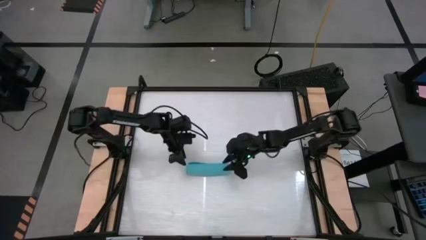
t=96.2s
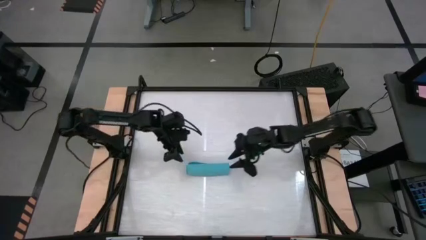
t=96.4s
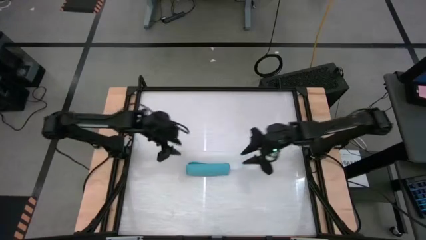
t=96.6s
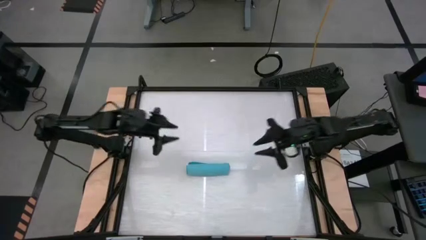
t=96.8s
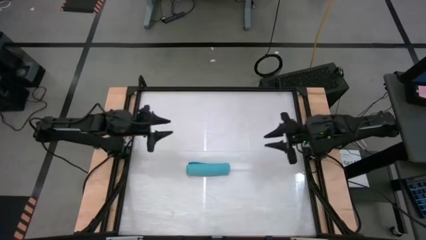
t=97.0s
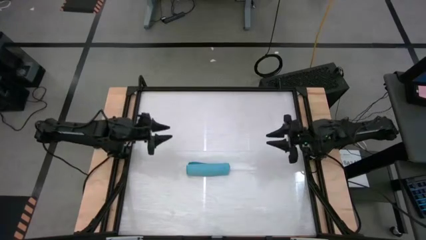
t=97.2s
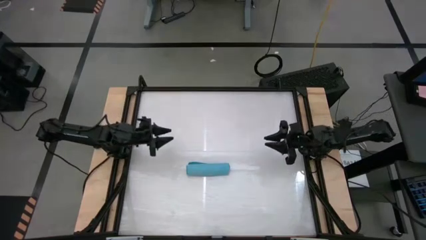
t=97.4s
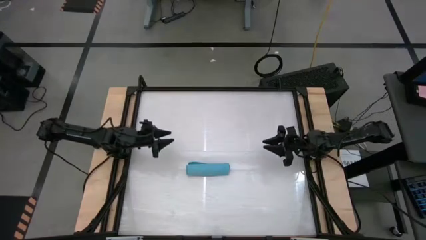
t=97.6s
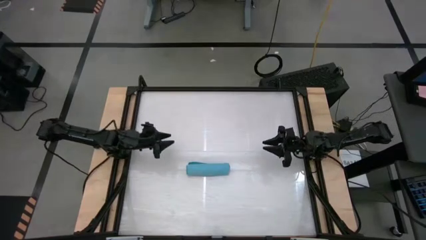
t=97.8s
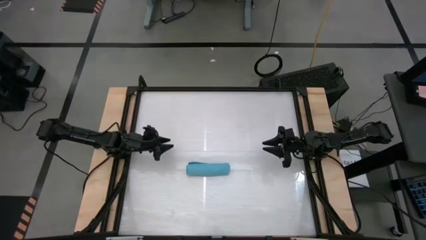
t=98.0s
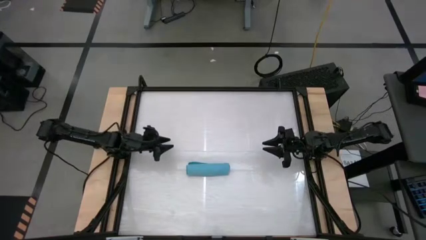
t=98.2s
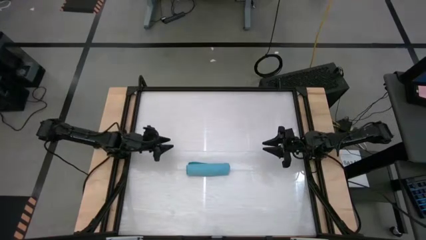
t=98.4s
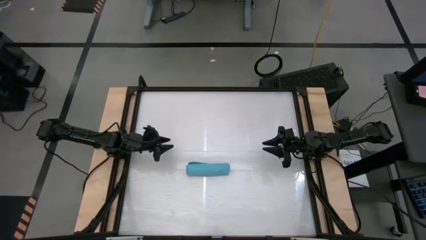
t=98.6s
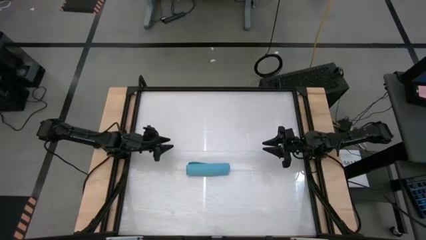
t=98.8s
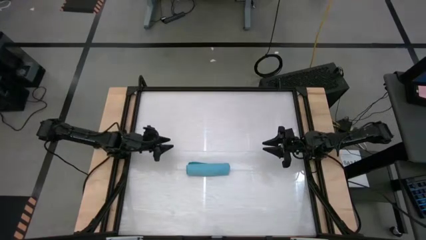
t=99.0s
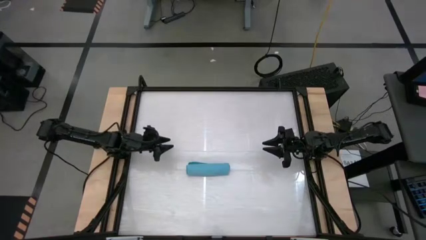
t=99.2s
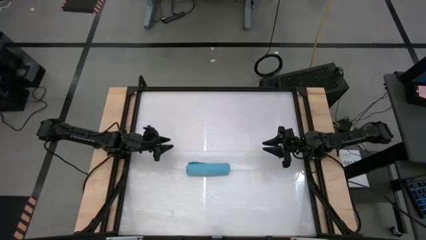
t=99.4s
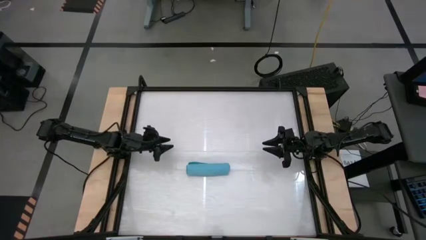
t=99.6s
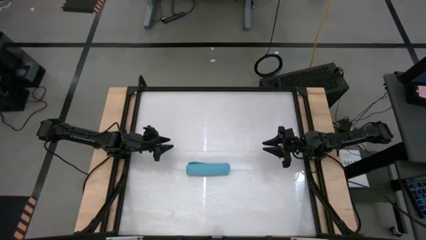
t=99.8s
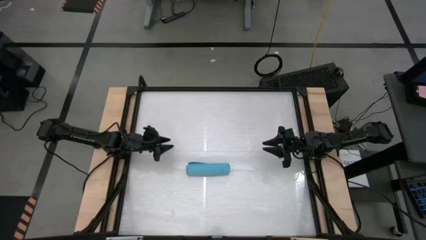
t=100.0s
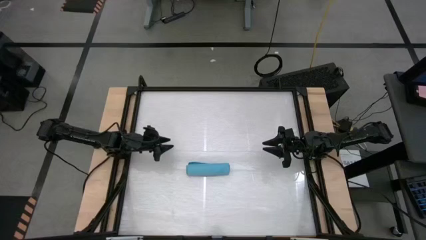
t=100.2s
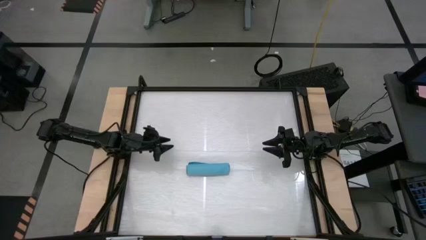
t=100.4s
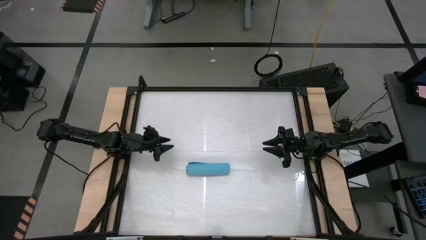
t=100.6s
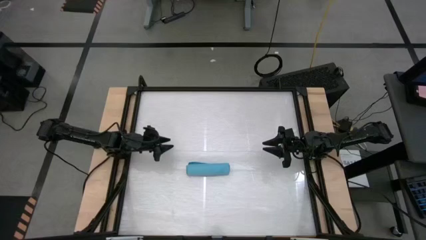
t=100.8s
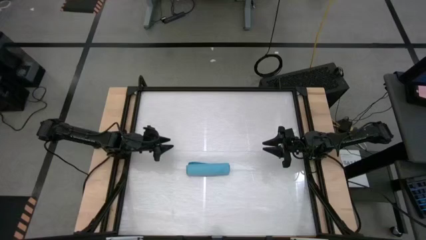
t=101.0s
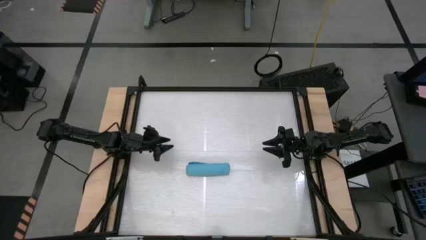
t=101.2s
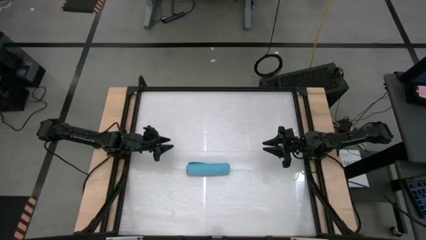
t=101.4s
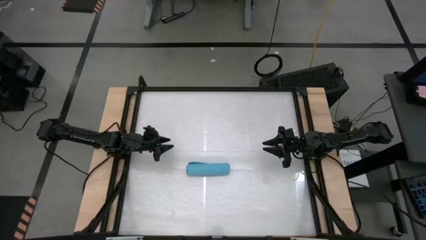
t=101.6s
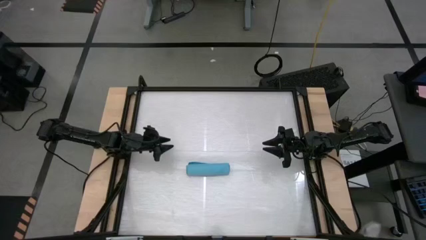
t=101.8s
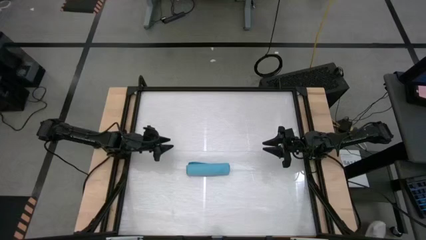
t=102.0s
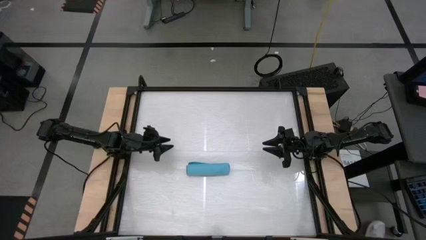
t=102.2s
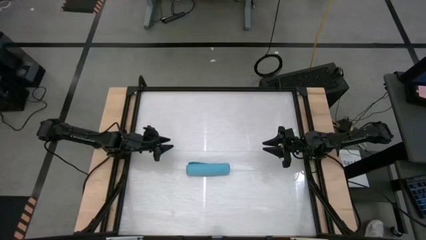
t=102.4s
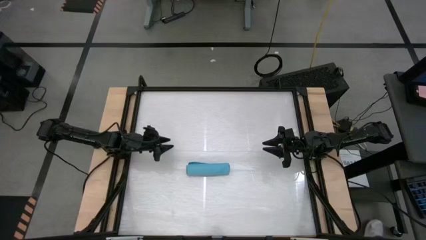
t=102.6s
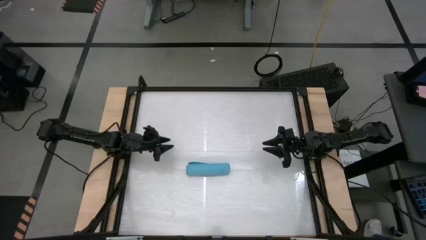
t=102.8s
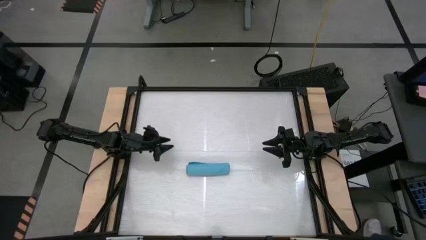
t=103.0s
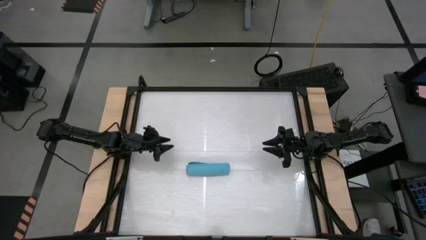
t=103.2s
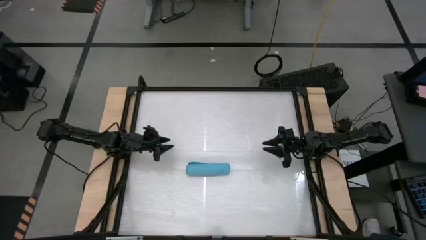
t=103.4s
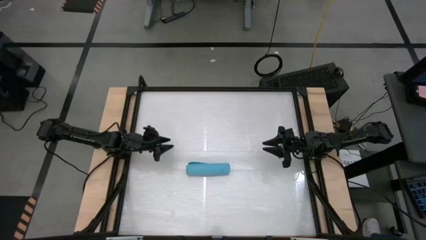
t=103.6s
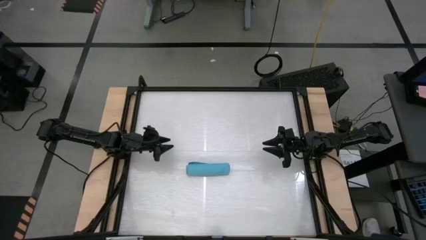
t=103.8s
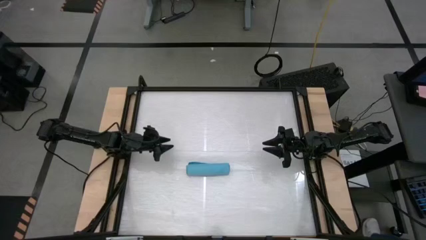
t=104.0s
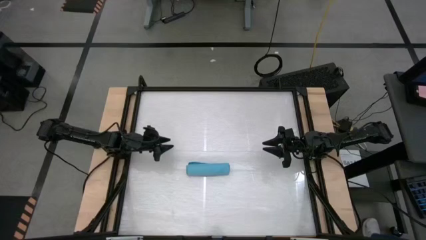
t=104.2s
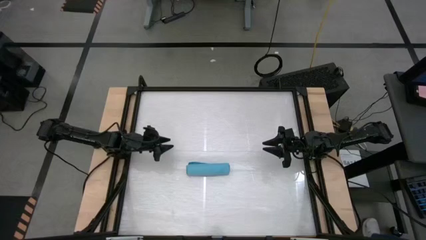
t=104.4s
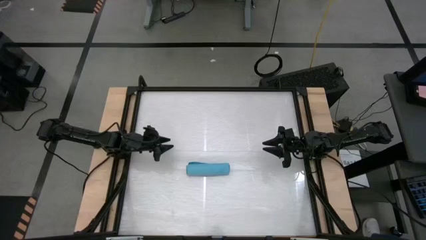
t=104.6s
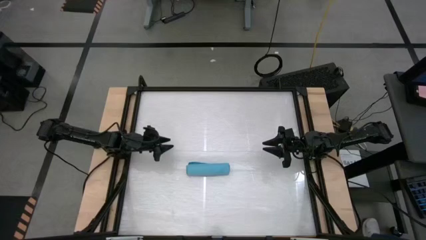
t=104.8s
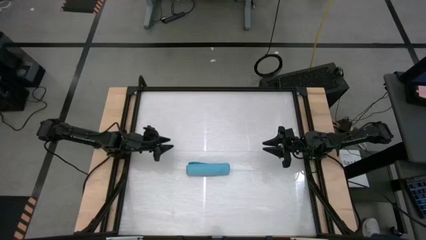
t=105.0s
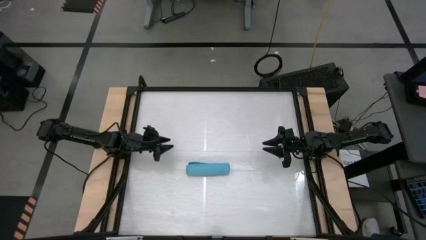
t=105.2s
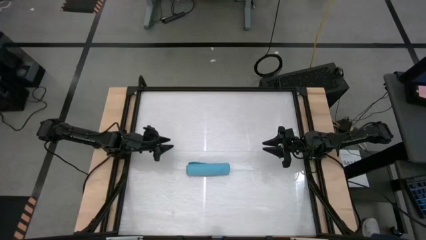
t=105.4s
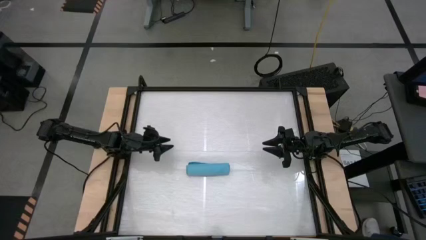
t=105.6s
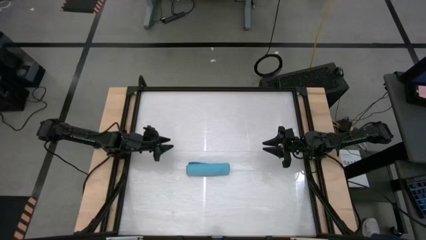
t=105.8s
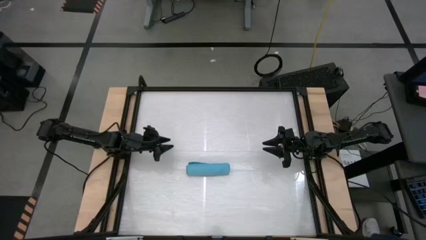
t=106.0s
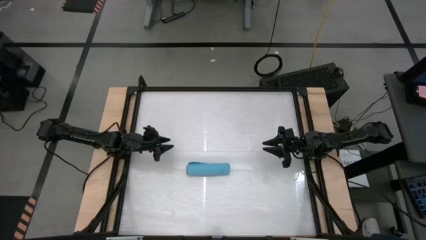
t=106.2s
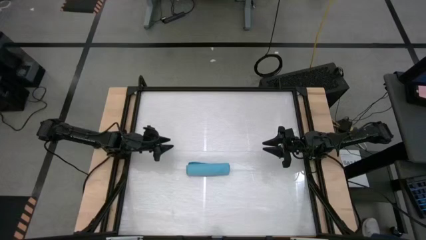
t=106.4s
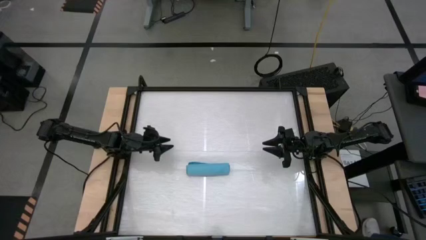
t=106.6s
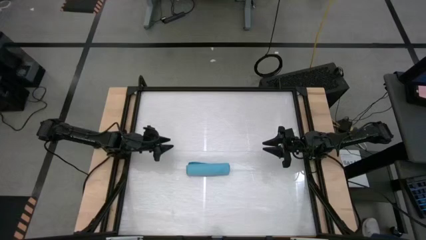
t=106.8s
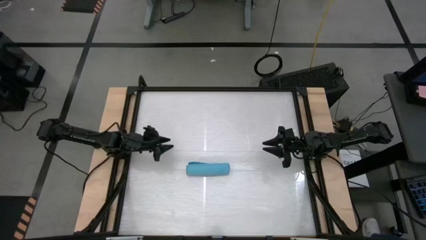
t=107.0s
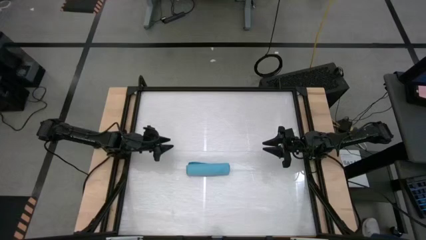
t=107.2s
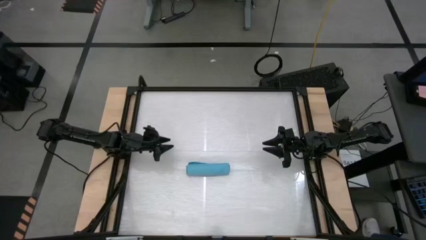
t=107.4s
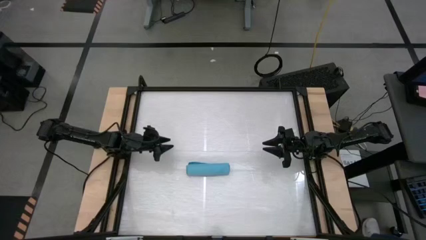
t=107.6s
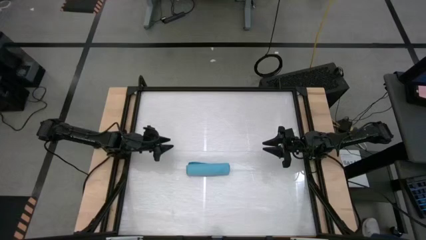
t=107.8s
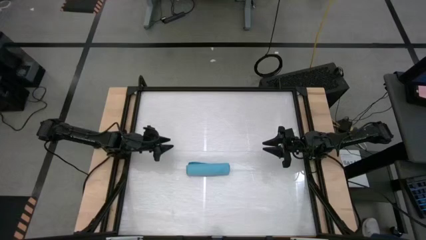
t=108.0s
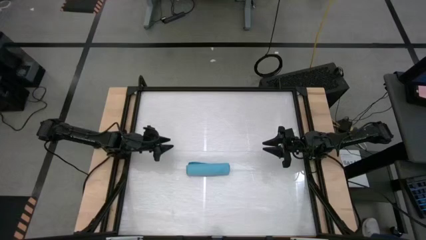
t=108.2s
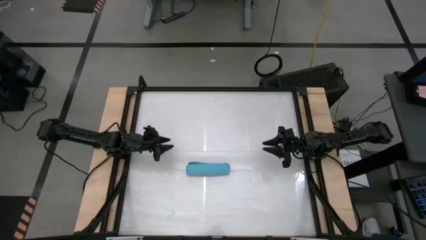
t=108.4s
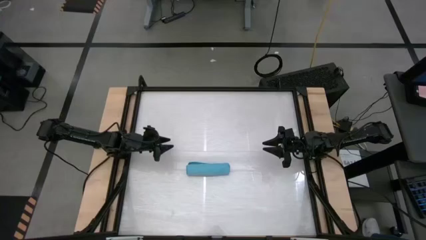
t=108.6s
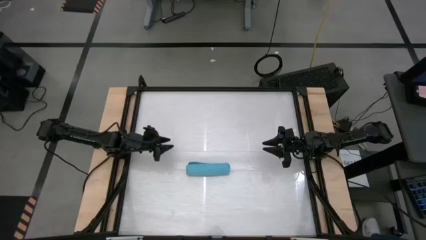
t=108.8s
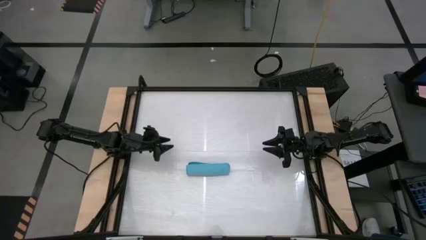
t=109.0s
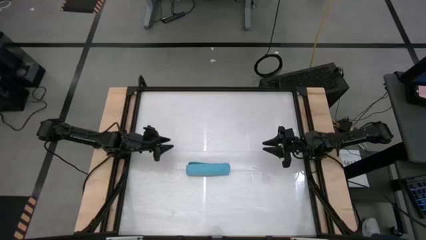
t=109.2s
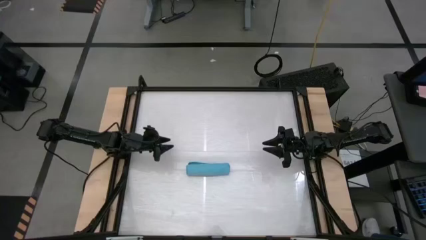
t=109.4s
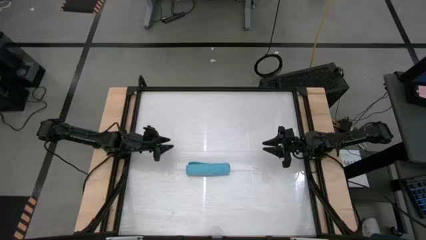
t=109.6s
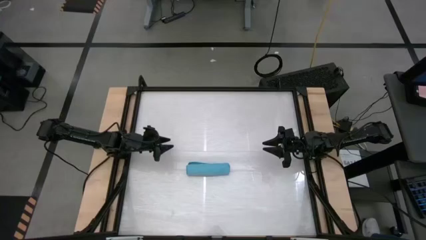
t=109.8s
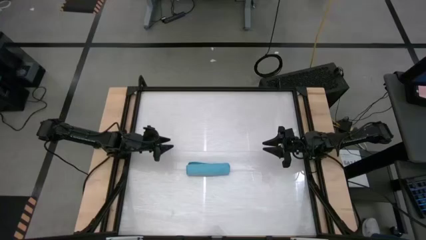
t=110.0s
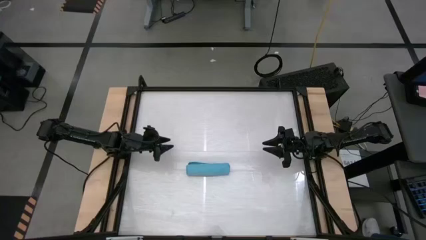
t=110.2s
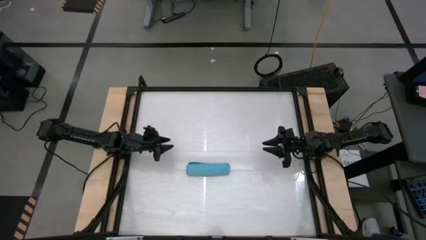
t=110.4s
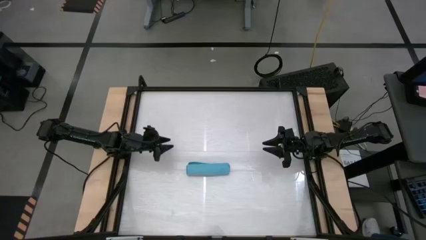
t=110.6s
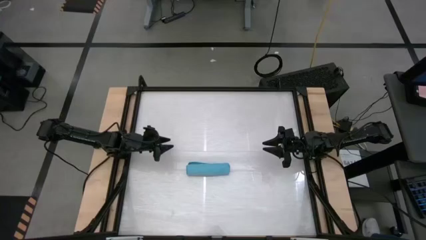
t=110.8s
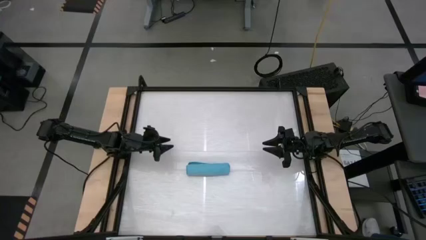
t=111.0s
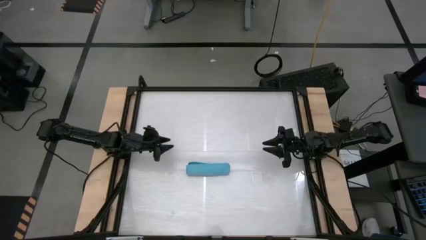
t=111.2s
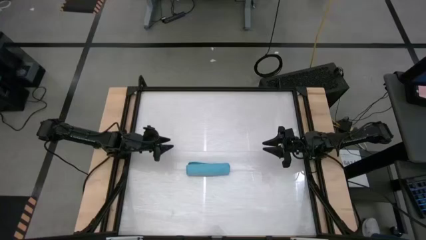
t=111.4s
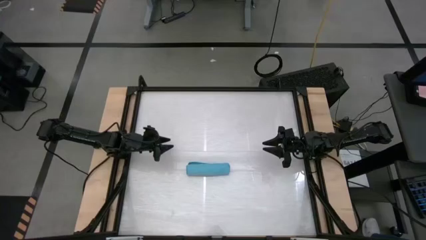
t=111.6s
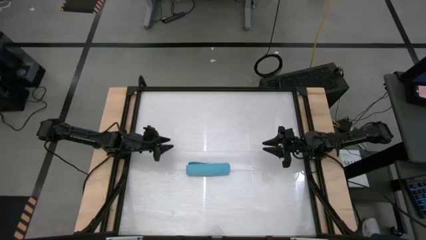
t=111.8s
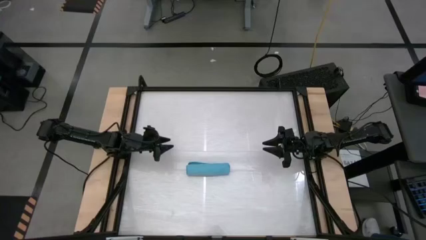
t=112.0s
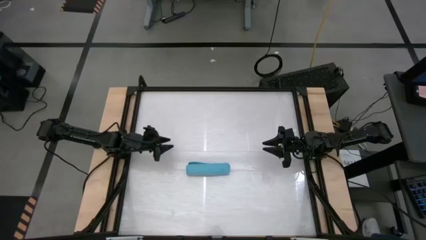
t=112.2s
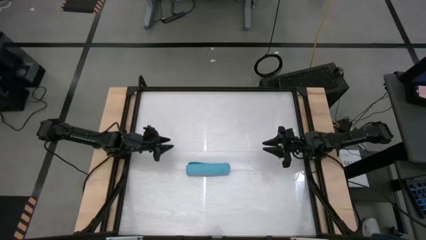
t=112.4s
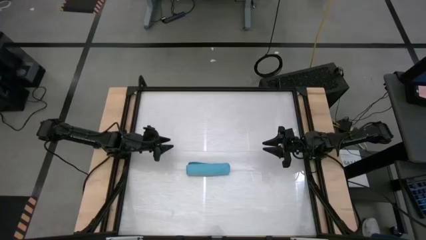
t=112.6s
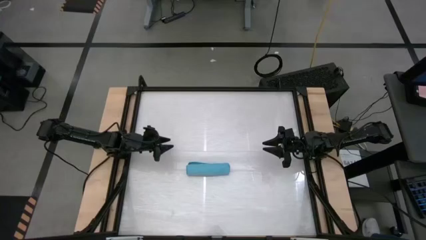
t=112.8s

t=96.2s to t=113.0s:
Task: Roll towel
Return to Home Position
